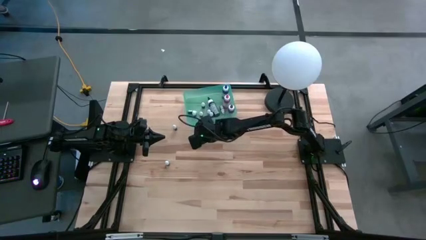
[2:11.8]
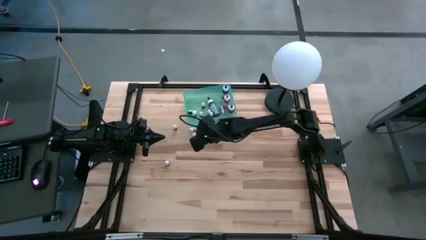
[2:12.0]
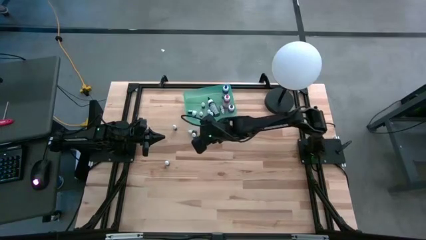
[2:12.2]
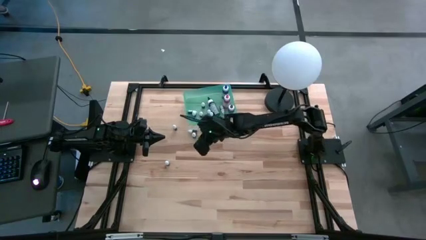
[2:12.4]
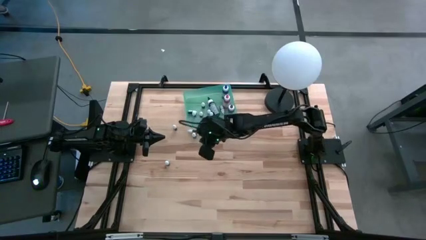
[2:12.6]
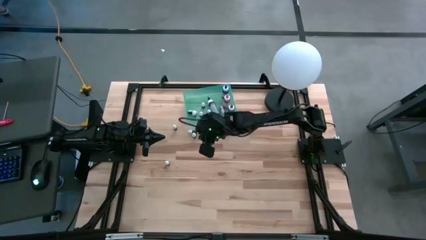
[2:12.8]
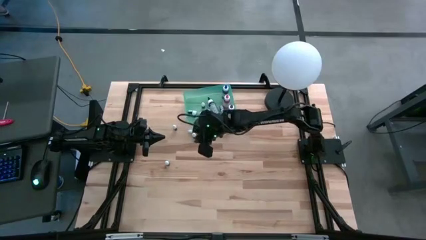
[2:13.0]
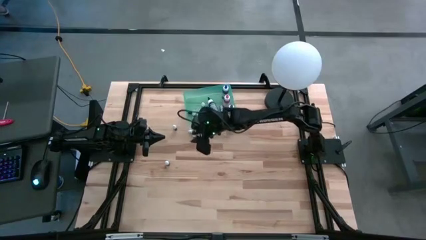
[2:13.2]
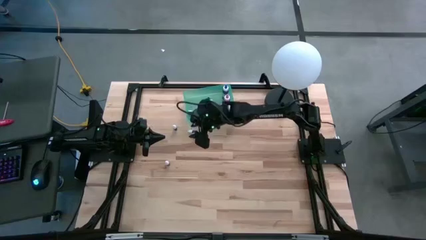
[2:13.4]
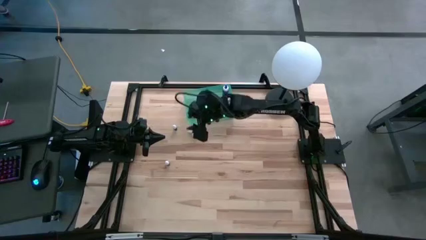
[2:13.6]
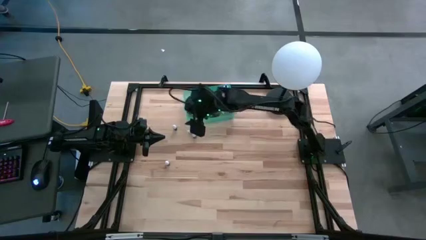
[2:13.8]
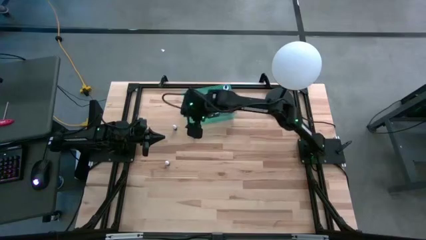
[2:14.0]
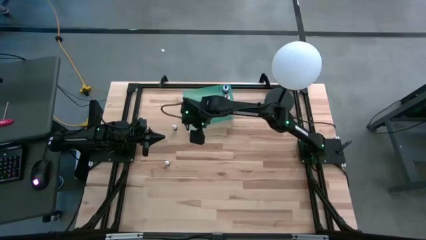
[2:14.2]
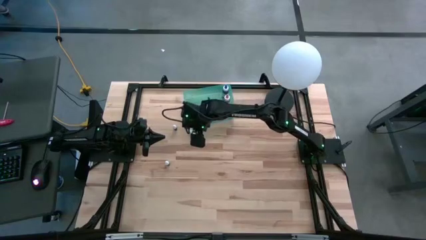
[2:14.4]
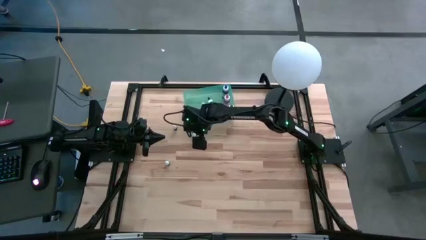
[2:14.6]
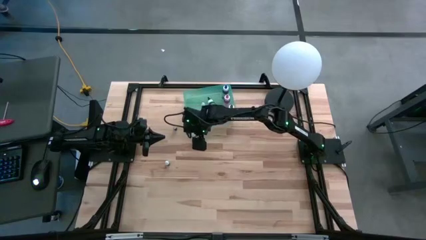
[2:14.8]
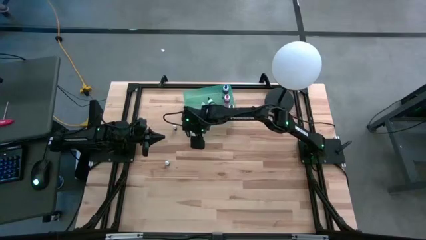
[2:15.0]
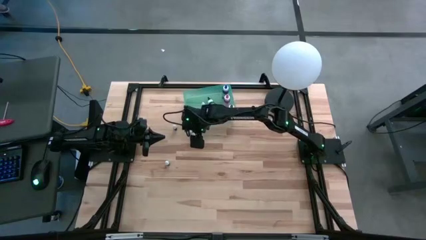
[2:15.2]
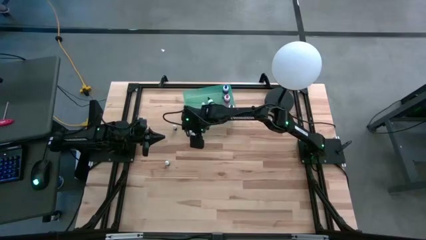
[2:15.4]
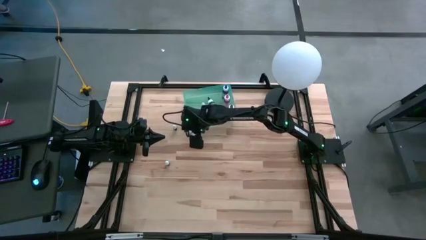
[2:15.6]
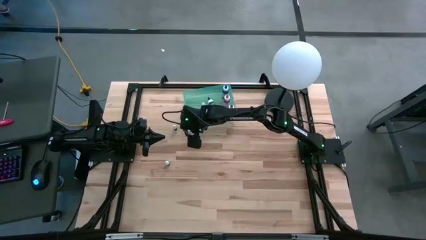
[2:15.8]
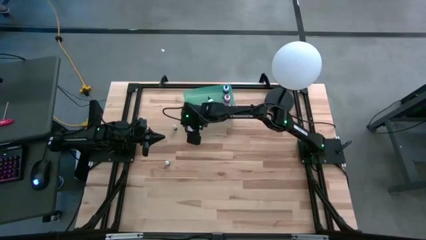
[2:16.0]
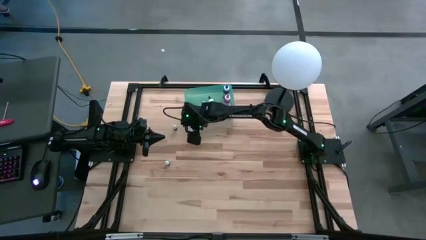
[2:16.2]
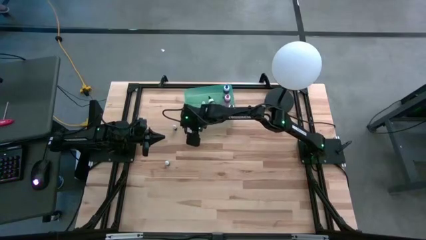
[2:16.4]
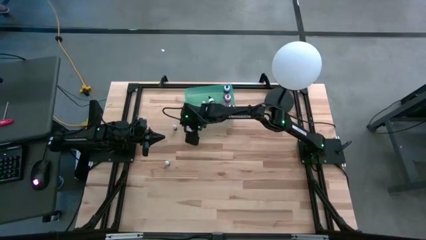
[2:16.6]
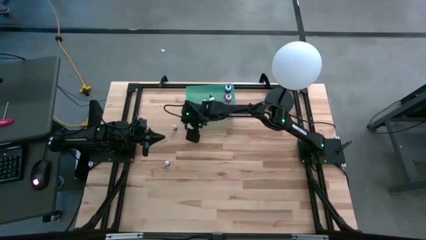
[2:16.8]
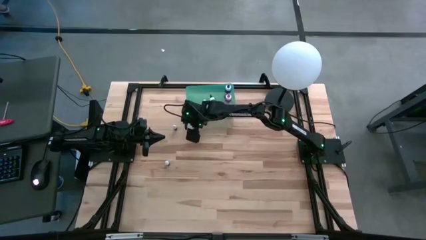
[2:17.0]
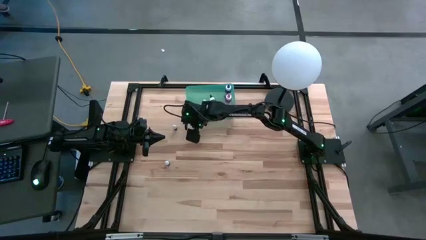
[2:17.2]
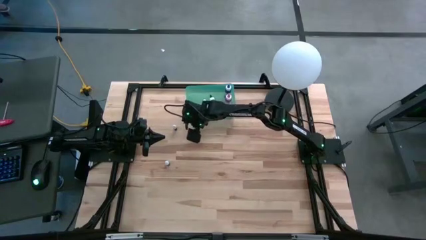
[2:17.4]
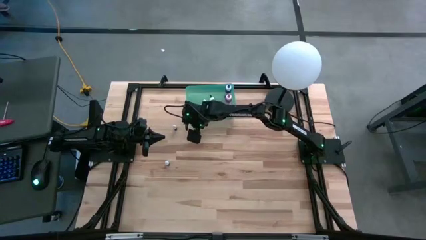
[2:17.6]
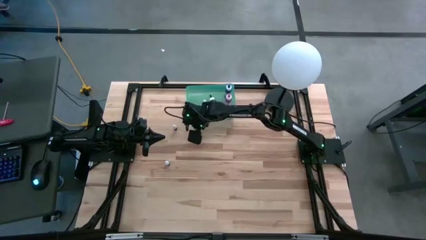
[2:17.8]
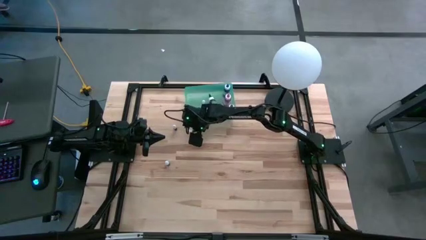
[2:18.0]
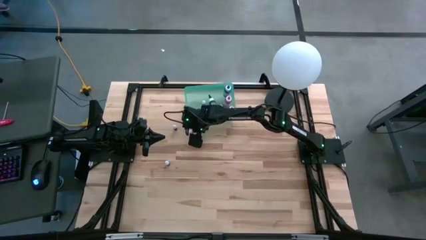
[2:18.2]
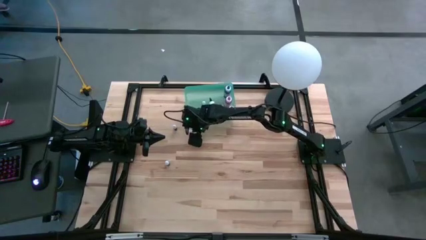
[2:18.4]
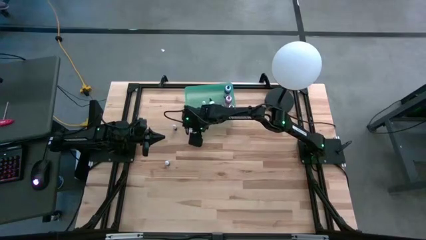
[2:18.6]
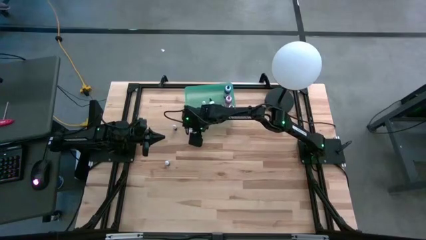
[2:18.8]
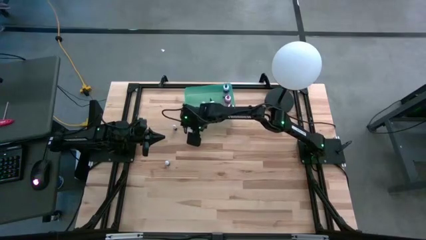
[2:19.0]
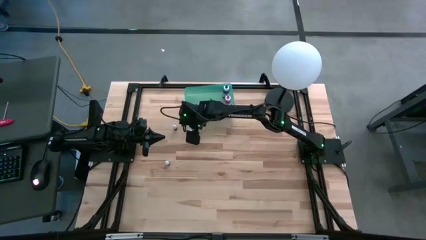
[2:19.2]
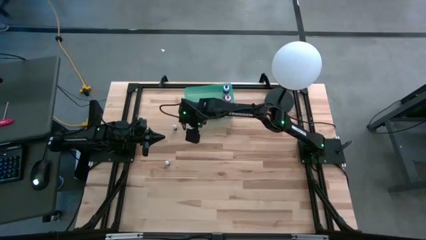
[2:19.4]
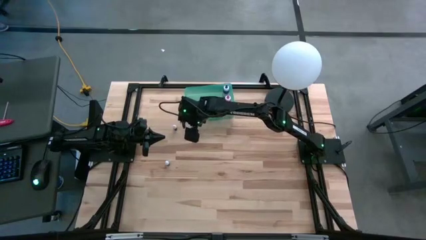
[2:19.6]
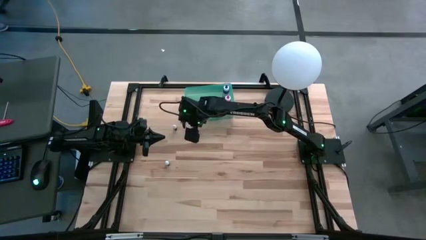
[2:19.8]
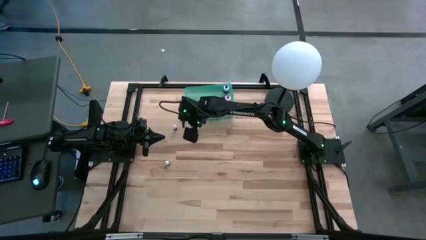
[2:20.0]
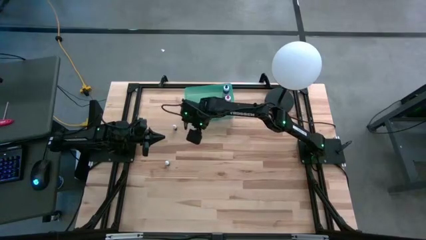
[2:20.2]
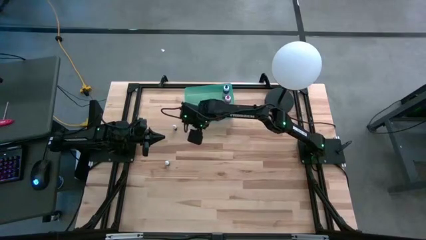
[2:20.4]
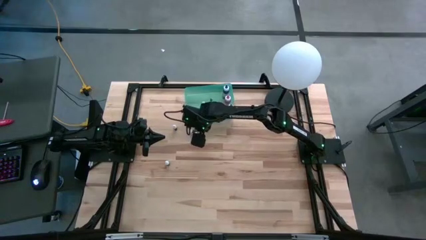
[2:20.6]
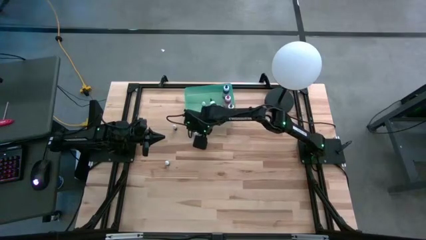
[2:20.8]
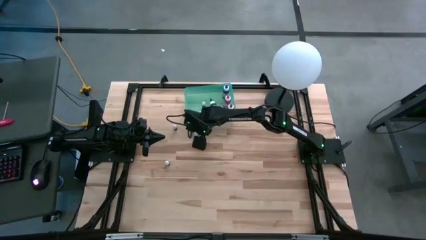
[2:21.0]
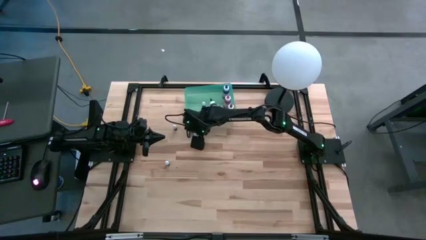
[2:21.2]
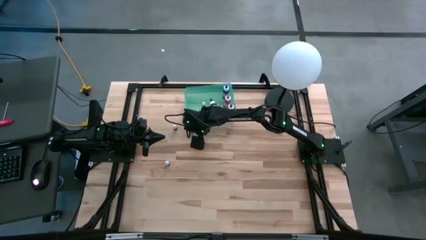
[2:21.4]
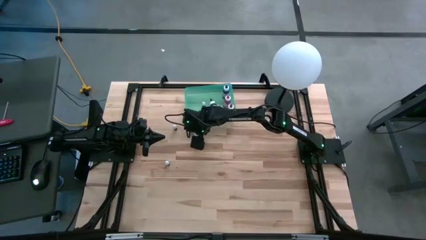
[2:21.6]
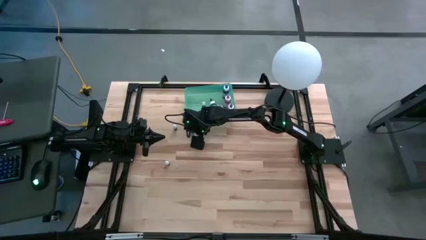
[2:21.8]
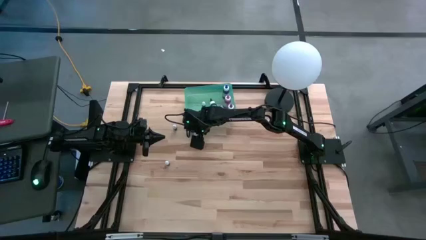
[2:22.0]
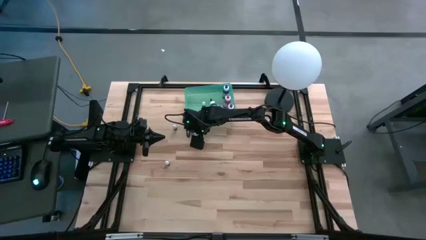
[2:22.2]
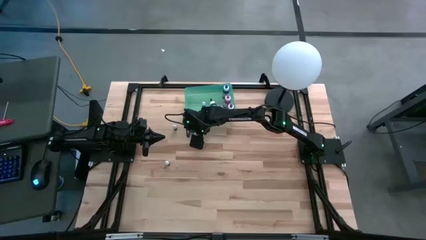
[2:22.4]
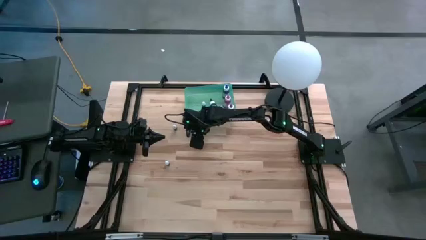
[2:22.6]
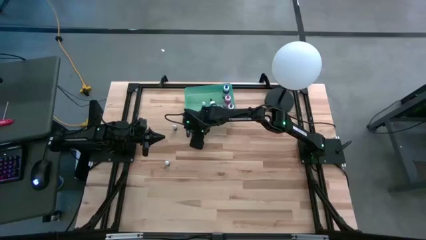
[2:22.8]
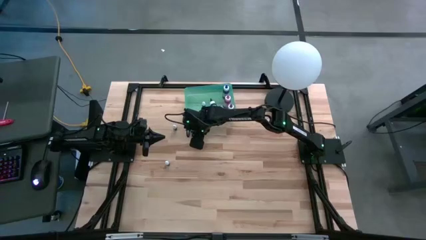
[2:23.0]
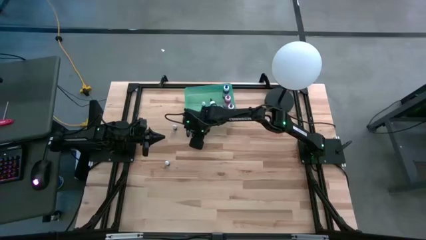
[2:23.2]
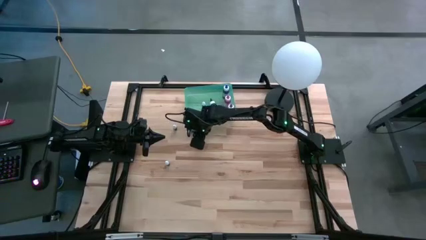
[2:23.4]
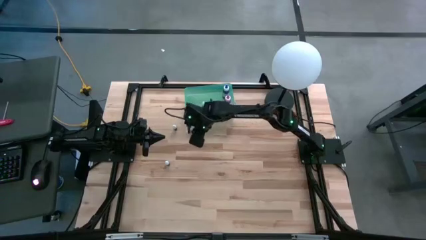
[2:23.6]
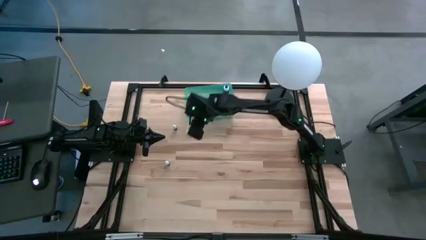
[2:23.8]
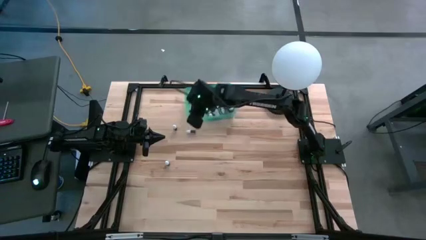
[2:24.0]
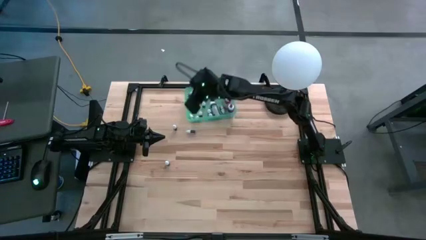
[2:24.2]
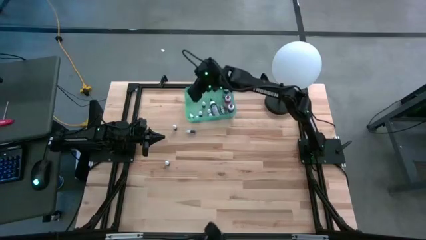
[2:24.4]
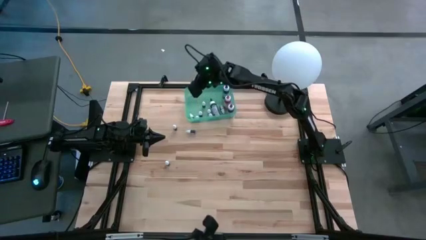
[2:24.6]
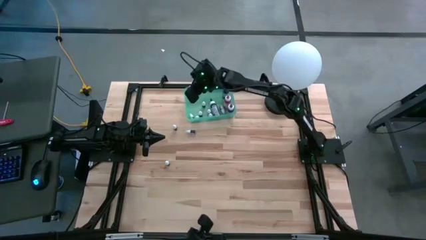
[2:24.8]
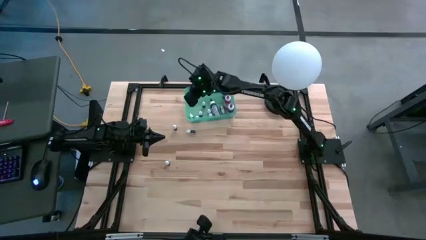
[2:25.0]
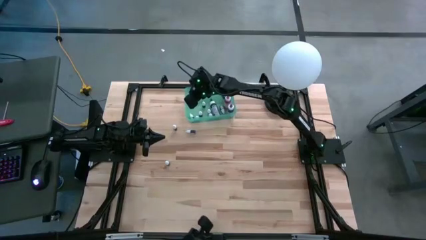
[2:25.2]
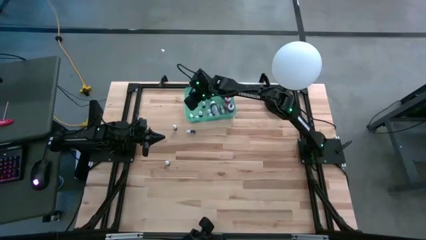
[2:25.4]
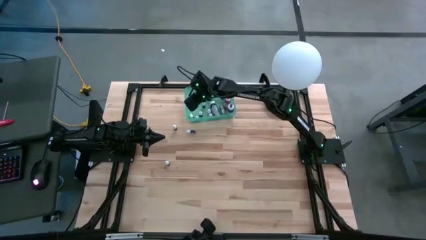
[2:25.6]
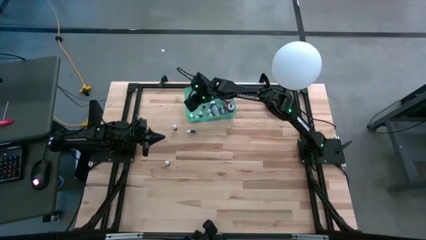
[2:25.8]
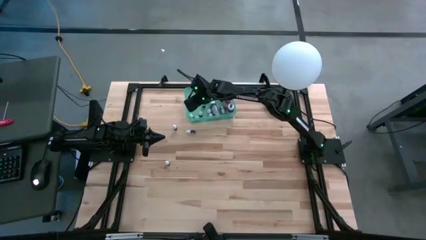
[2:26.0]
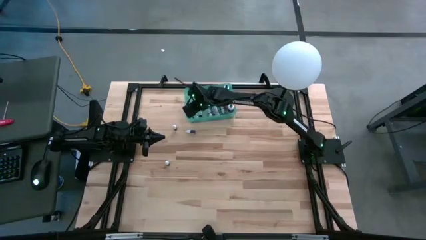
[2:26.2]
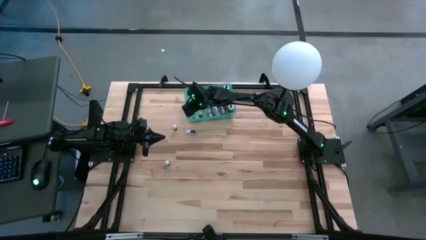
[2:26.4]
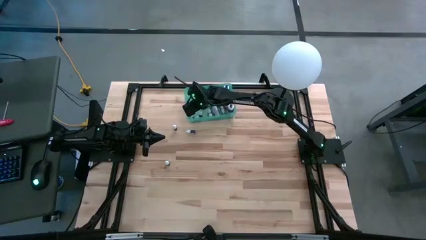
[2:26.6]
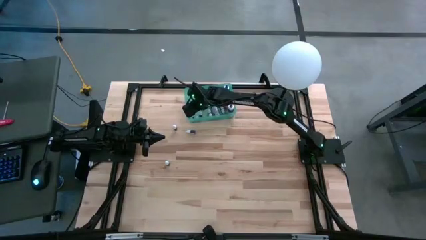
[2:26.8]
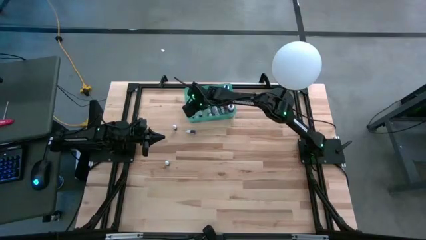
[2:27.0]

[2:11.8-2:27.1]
Task: Pick & Place food coloring
Put the small red food coloring into the bin
